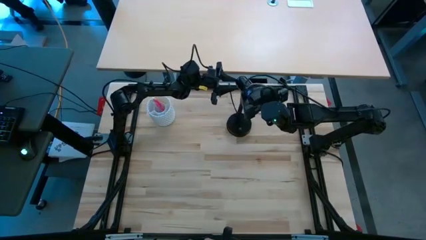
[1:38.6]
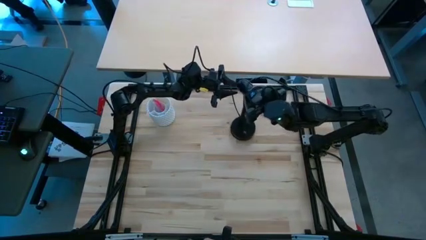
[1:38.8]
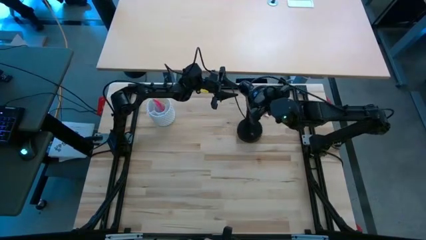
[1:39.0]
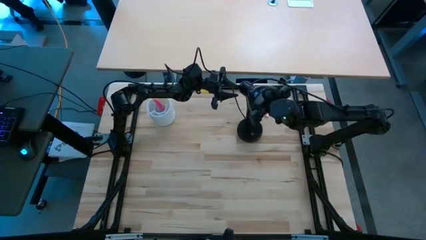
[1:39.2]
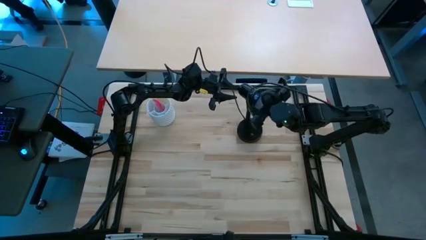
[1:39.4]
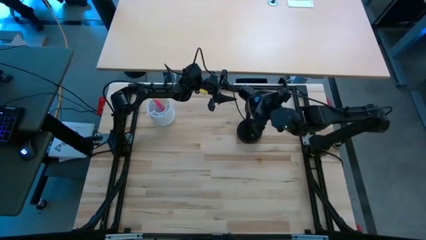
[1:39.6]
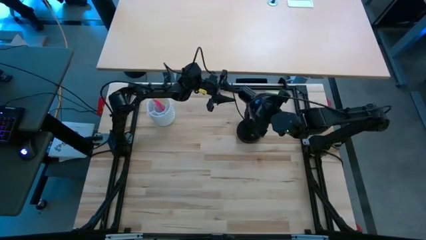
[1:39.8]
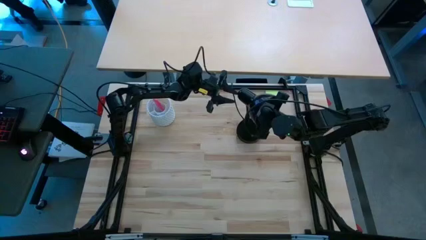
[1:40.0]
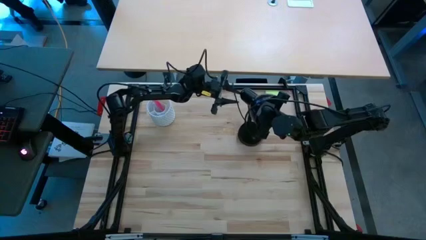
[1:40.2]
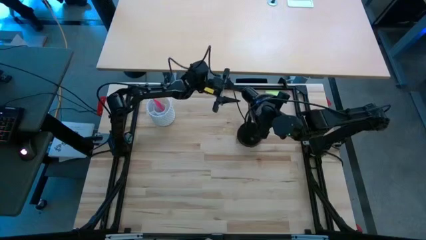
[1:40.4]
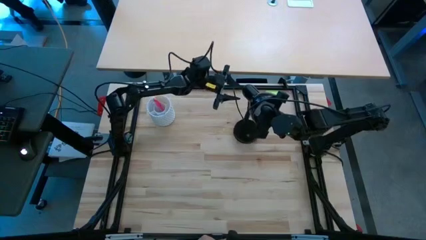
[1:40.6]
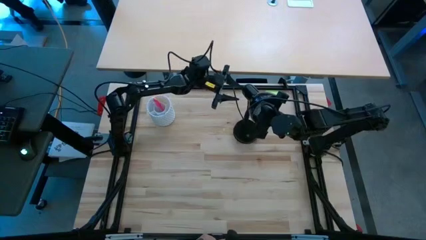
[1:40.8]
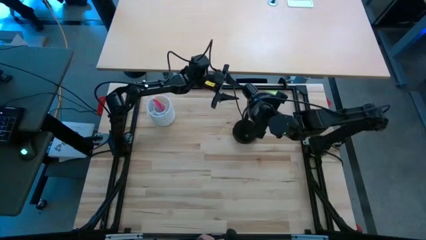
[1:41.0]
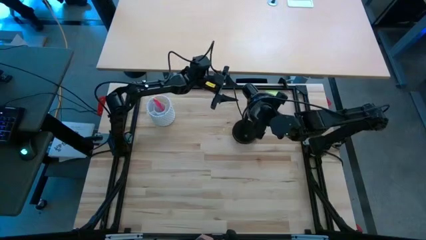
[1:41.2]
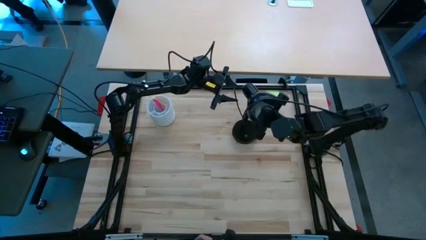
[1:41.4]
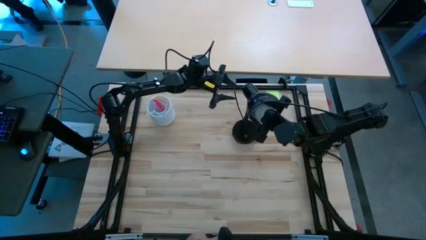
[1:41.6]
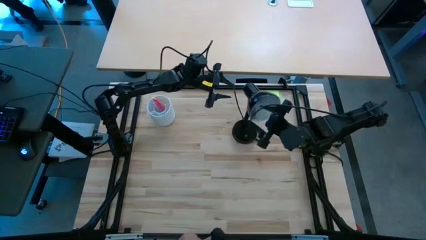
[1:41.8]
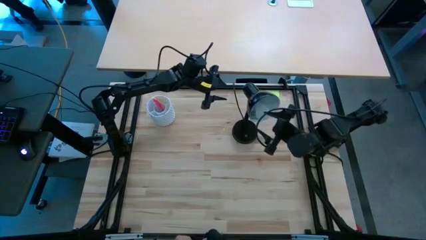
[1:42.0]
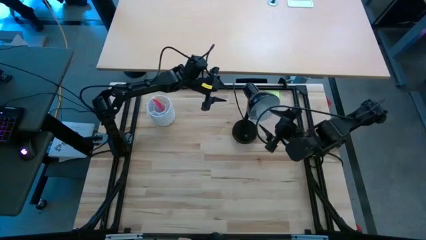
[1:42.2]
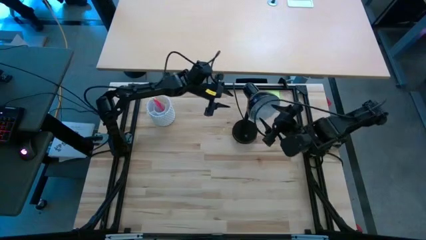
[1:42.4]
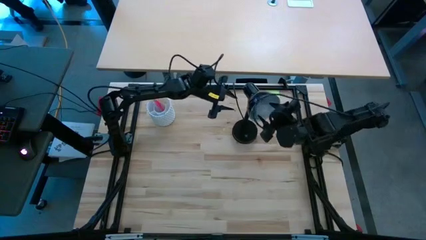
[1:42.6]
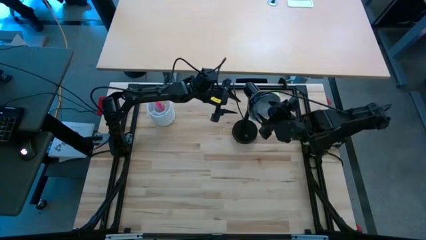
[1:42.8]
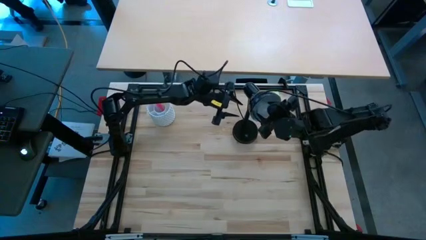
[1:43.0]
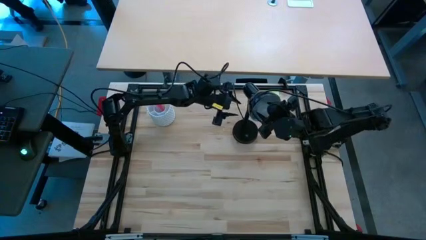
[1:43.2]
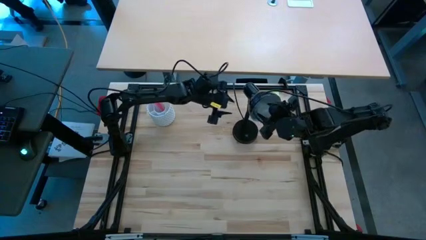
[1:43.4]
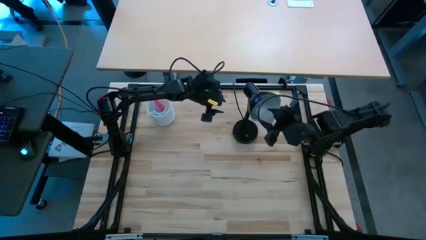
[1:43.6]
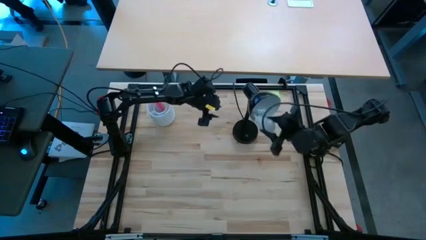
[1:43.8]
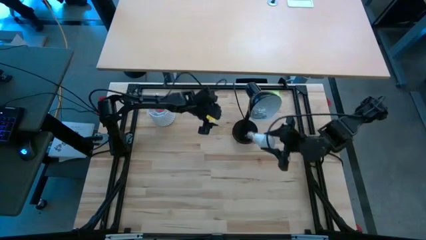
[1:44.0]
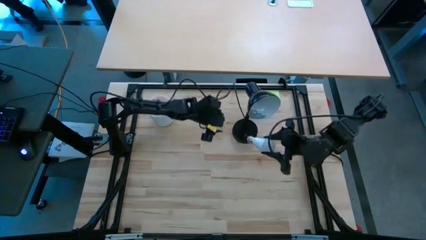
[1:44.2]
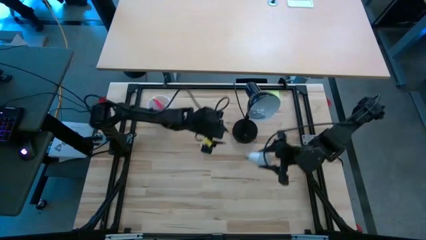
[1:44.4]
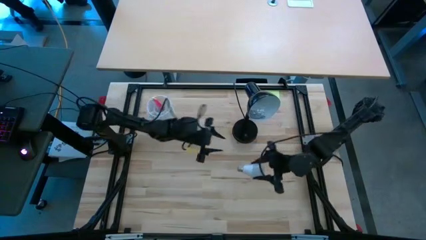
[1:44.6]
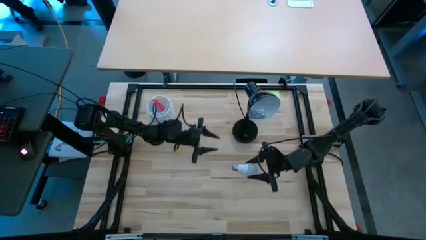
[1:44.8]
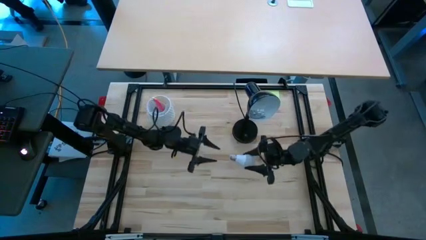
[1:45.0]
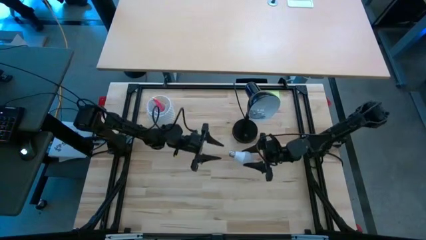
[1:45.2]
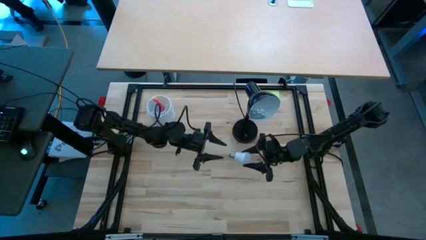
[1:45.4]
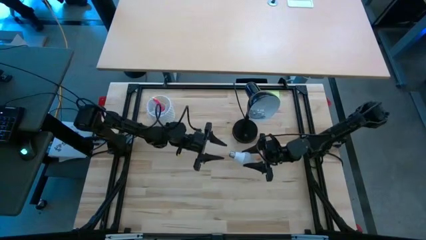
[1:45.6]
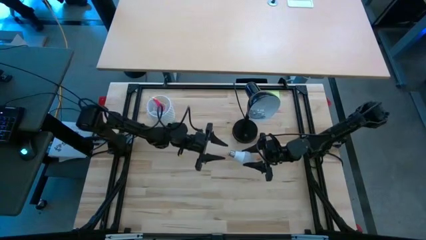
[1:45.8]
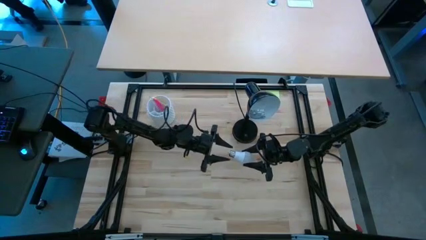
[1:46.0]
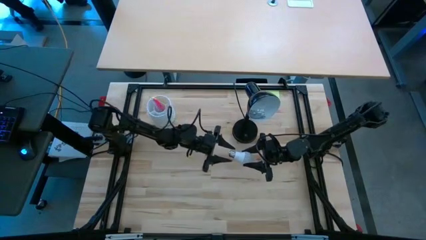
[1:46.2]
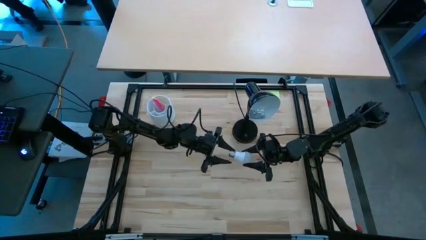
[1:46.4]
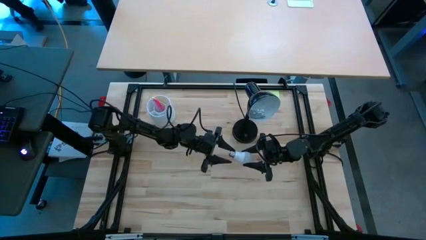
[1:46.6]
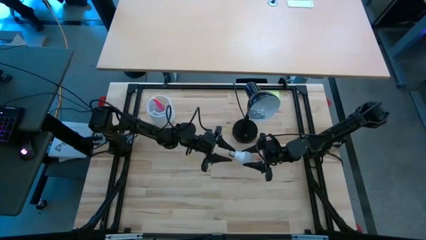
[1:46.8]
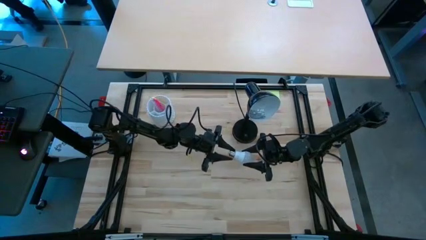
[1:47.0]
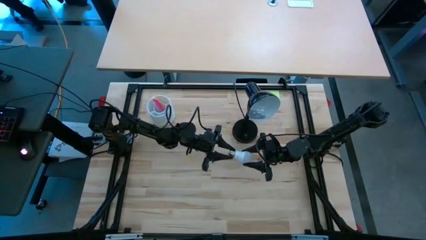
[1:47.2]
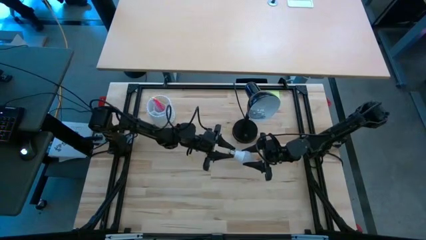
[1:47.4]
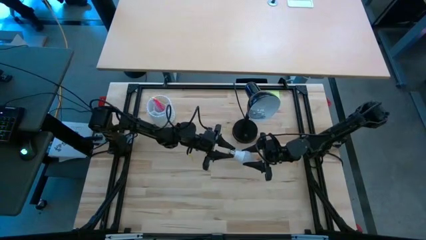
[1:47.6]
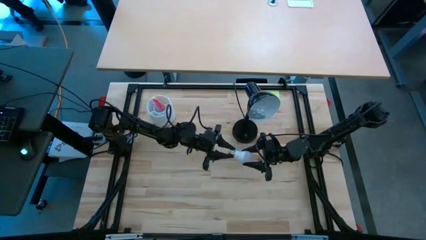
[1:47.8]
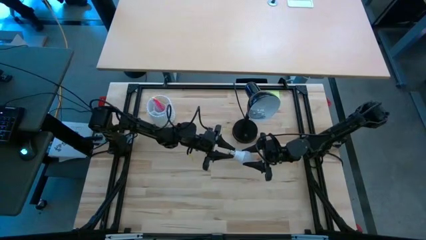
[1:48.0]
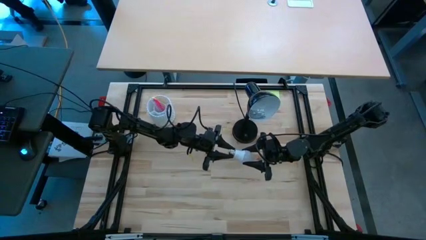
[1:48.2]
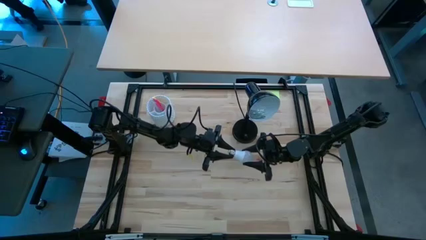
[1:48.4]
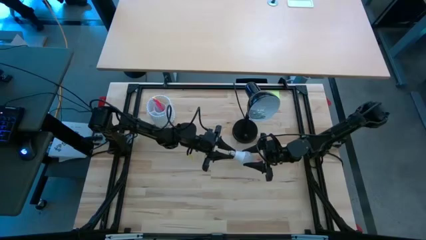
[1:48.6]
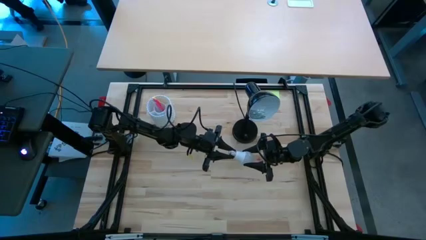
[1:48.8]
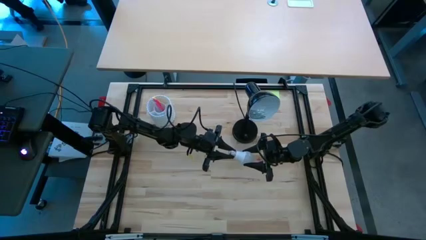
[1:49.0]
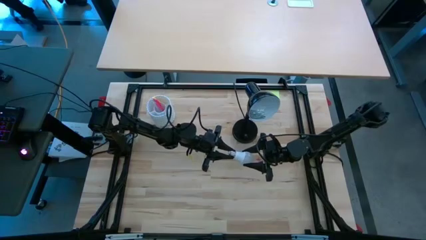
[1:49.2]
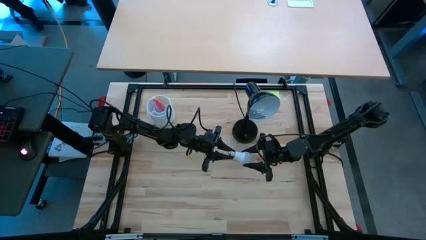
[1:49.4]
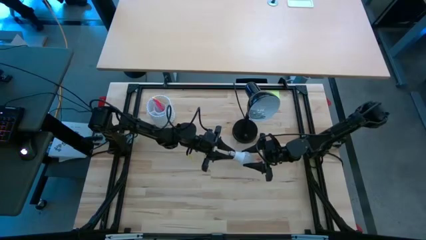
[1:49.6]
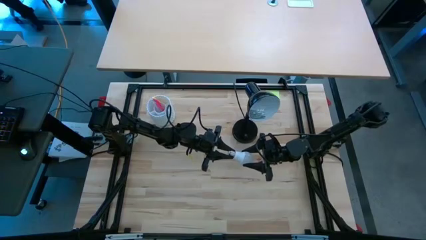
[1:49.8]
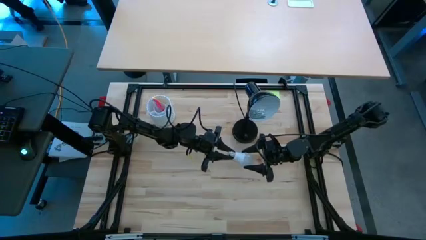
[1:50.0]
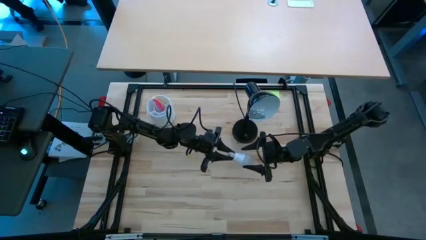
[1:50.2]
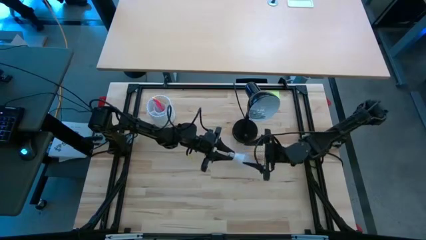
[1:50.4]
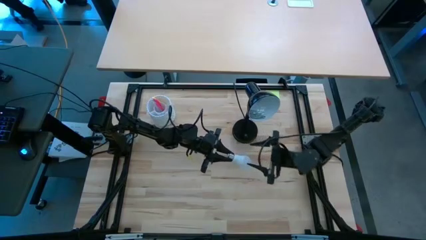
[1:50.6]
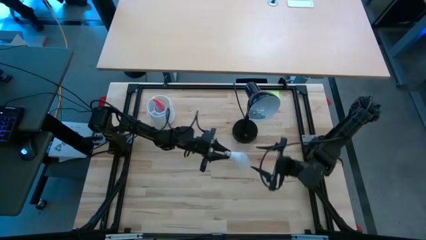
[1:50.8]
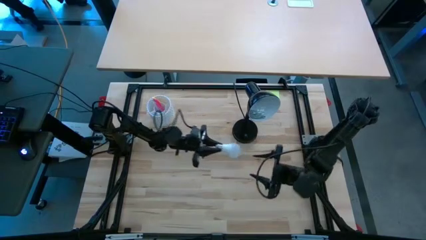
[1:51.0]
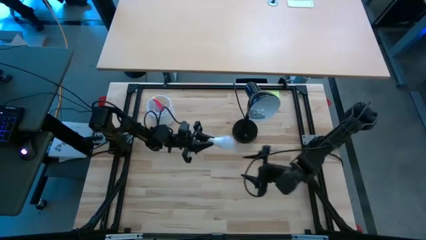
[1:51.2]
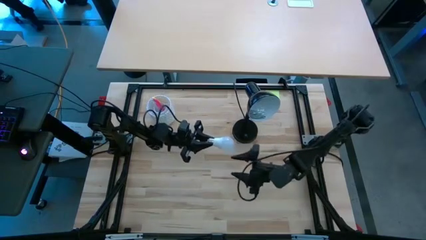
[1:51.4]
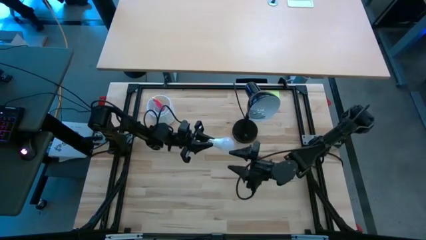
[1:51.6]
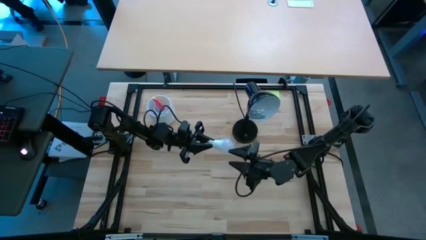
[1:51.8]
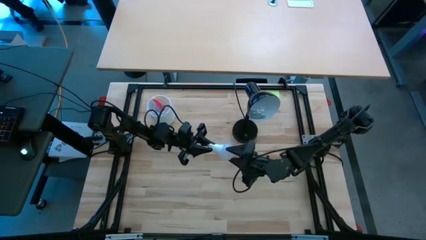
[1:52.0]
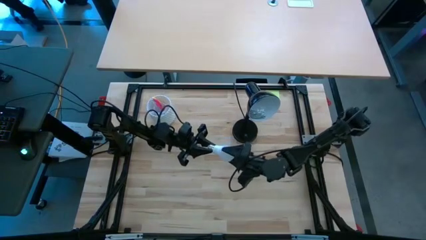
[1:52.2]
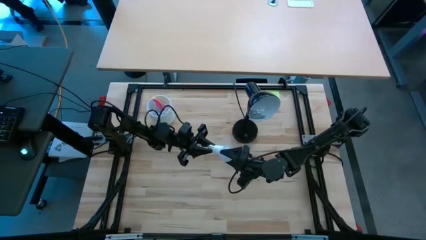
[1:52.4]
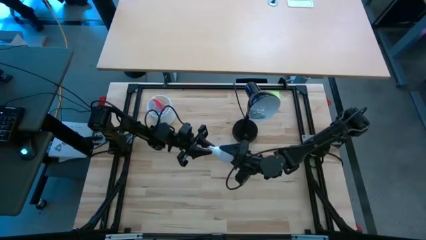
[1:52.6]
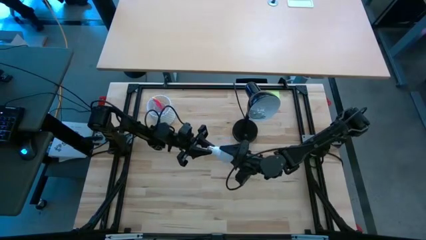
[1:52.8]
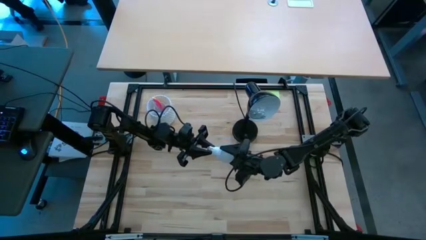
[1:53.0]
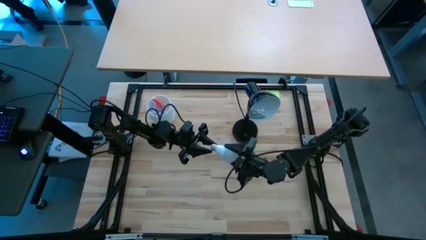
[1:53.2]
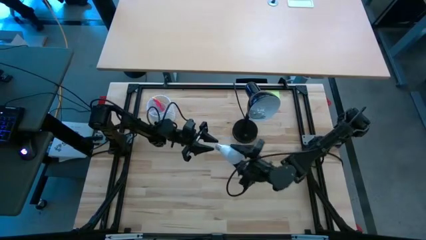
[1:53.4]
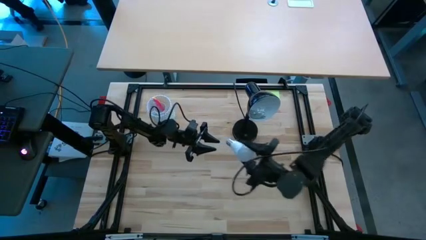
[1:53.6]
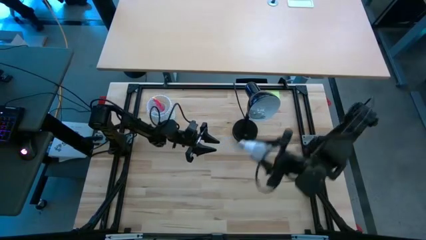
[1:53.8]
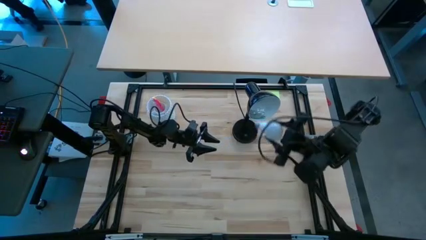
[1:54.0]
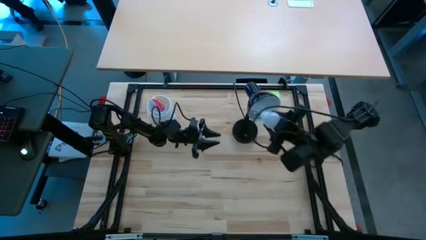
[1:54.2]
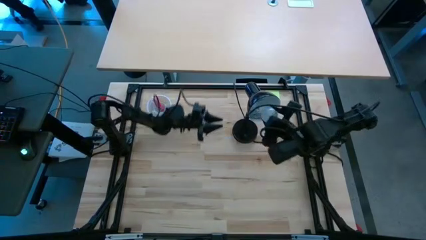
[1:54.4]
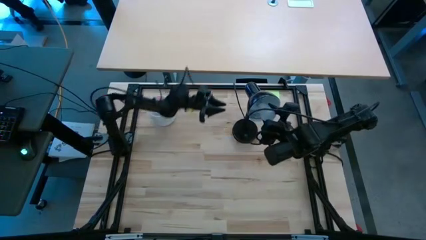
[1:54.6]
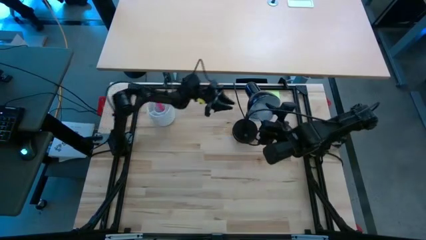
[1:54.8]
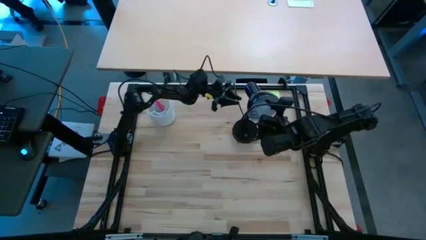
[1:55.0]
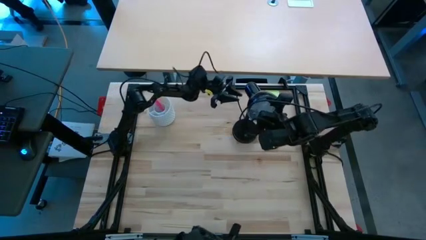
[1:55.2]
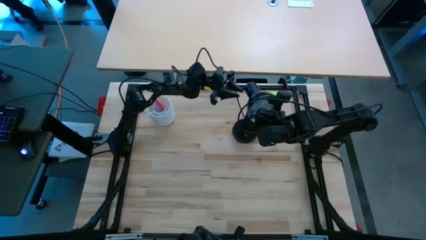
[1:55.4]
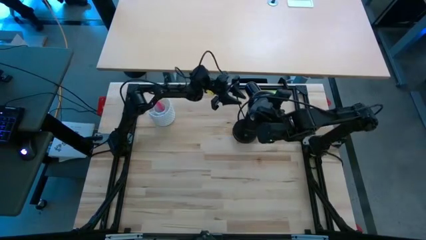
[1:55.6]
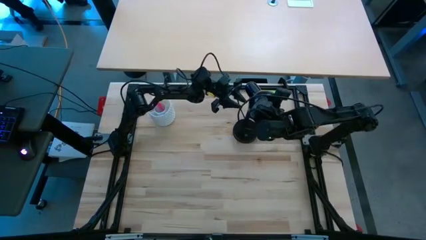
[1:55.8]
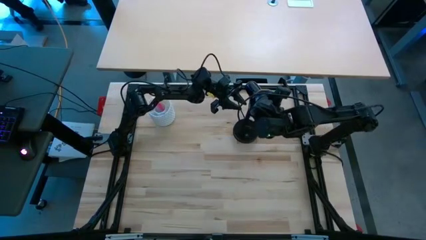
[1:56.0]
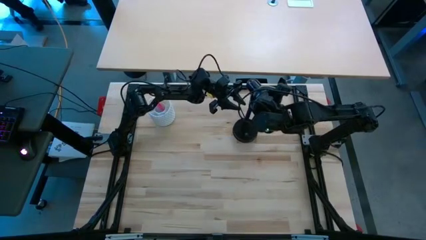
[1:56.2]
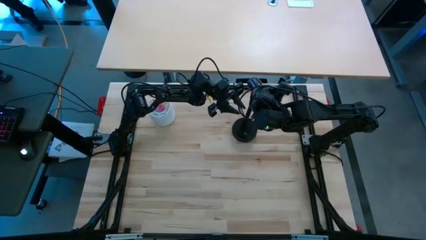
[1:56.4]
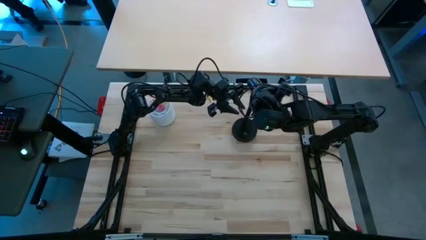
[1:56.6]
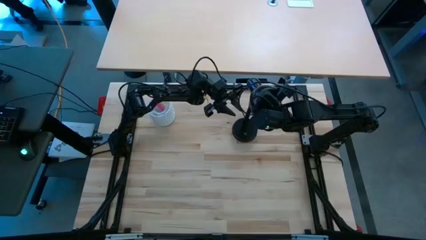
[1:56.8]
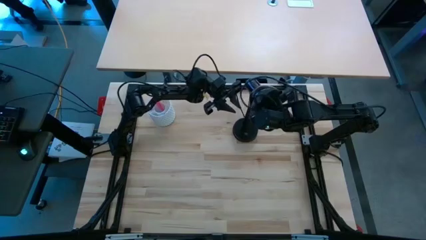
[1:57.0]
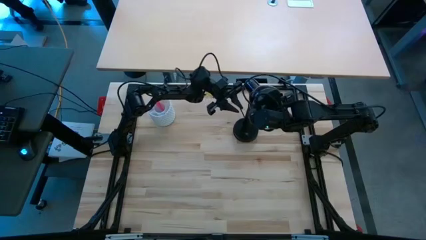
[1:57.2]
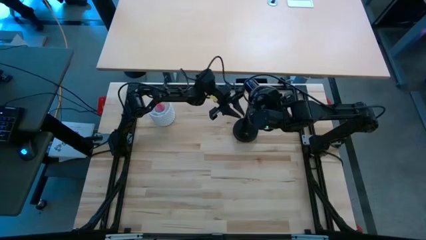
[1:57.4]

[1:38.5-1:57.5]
Task: Screw lightbulb
Insert the light bulb into the desk lamp
